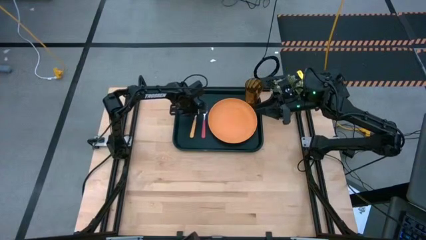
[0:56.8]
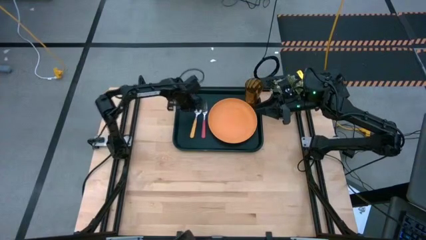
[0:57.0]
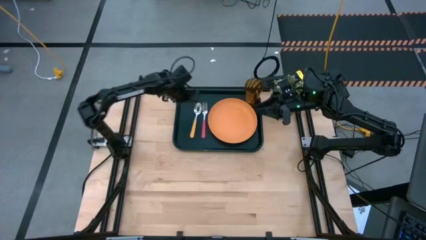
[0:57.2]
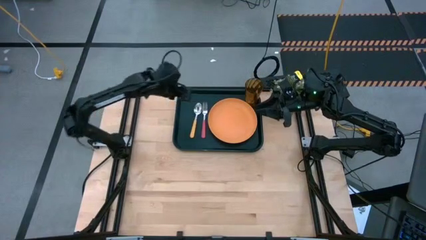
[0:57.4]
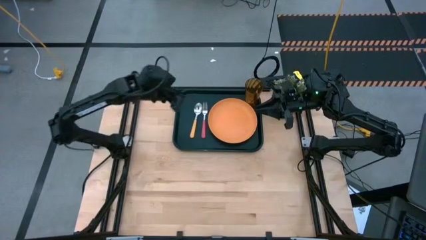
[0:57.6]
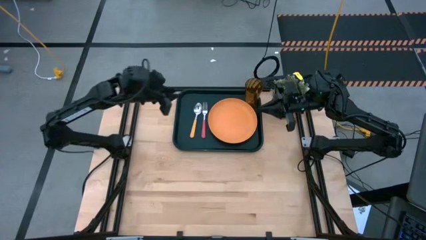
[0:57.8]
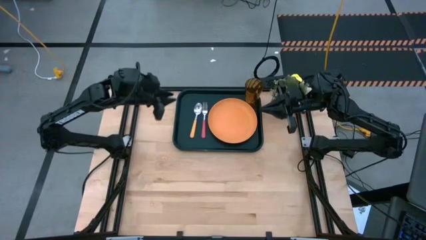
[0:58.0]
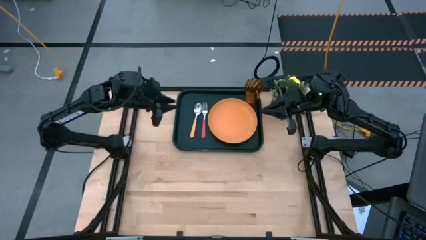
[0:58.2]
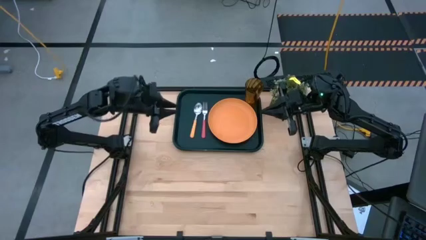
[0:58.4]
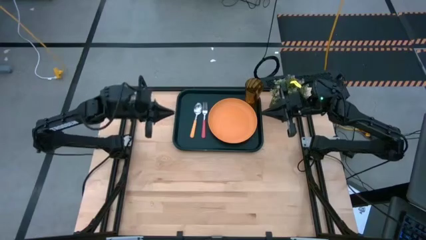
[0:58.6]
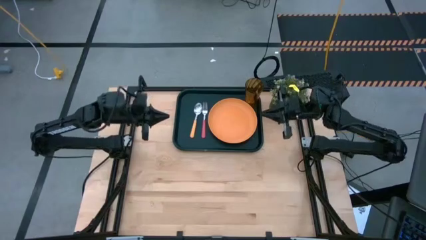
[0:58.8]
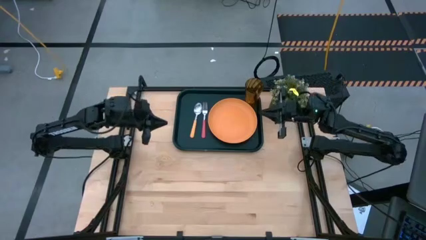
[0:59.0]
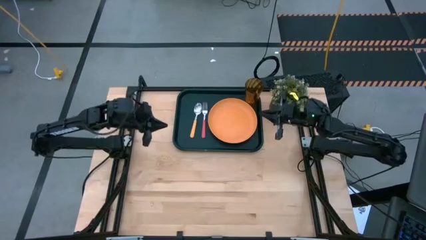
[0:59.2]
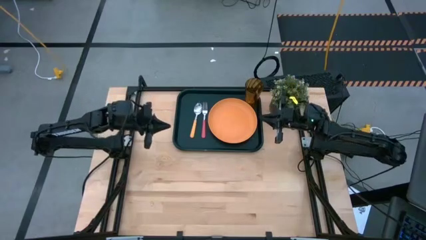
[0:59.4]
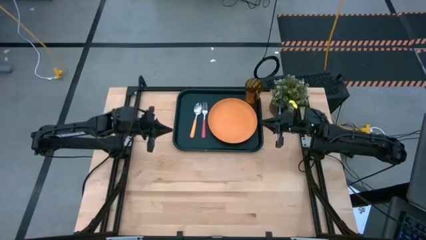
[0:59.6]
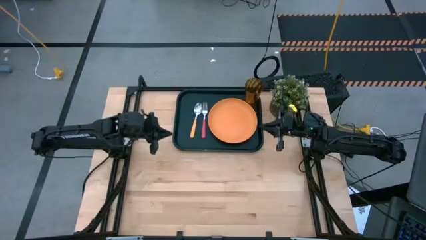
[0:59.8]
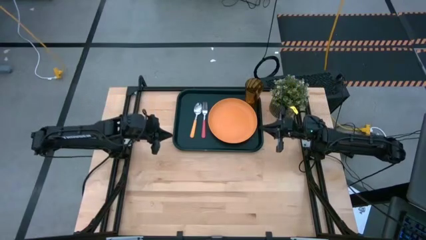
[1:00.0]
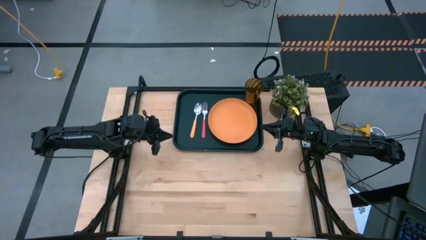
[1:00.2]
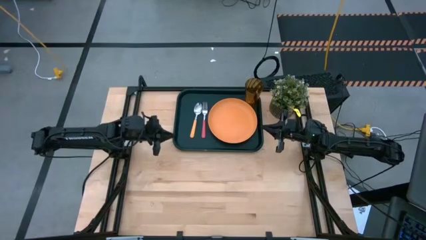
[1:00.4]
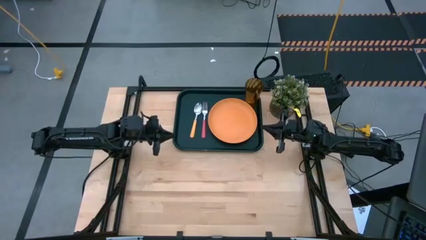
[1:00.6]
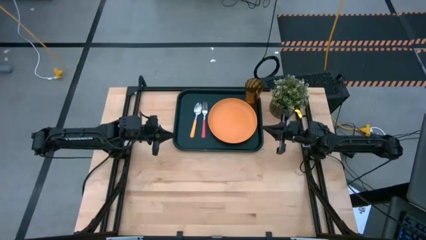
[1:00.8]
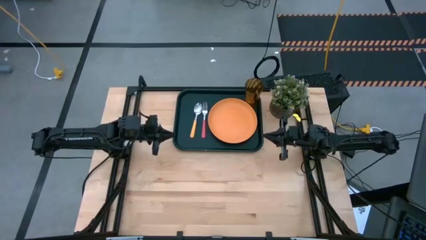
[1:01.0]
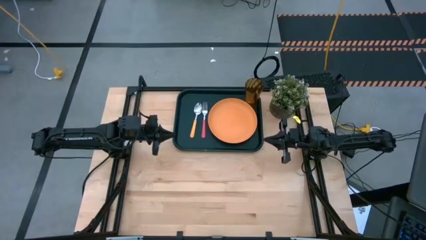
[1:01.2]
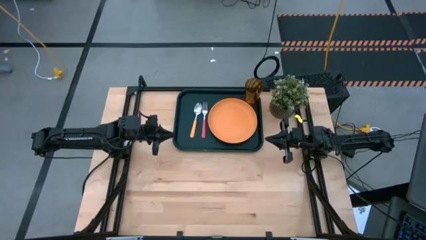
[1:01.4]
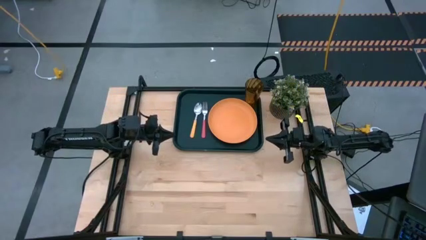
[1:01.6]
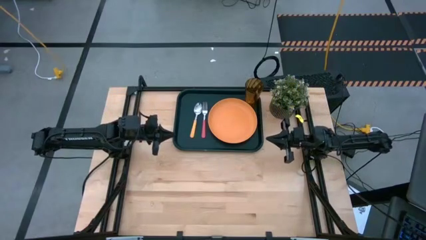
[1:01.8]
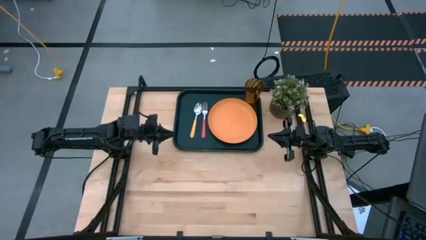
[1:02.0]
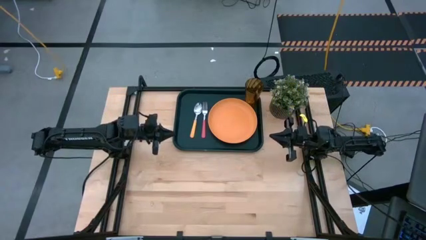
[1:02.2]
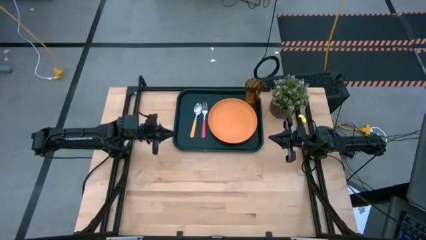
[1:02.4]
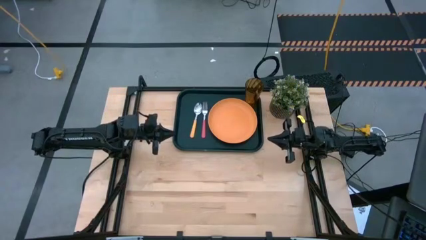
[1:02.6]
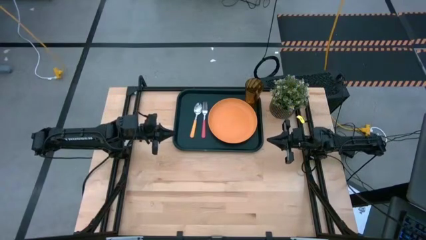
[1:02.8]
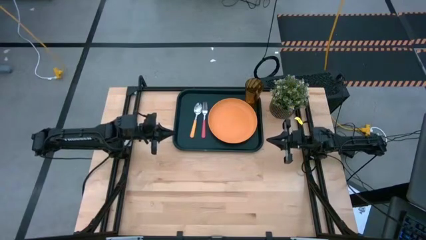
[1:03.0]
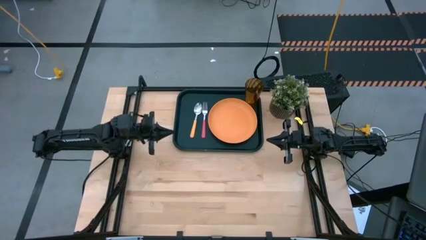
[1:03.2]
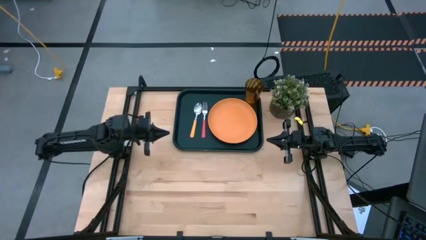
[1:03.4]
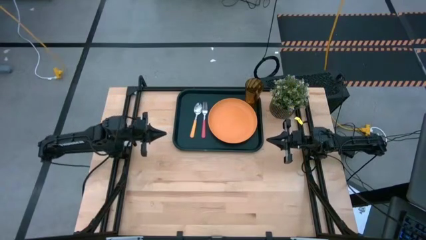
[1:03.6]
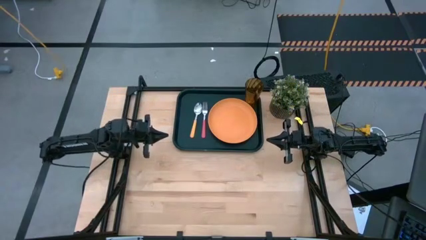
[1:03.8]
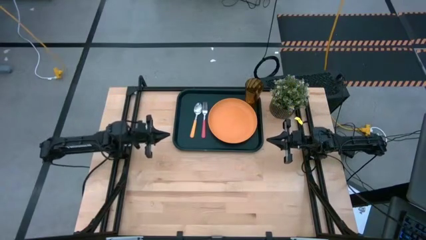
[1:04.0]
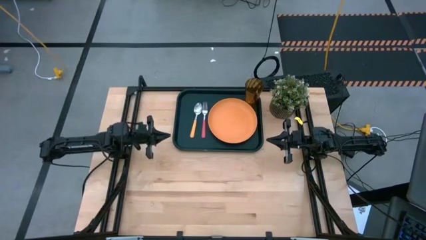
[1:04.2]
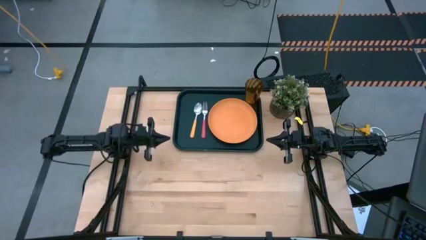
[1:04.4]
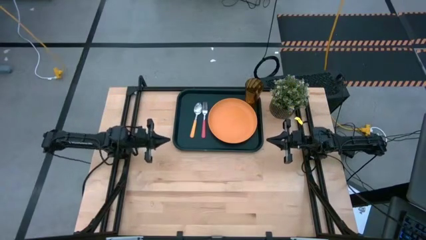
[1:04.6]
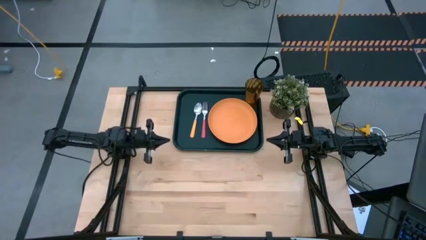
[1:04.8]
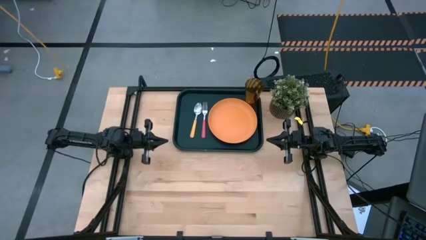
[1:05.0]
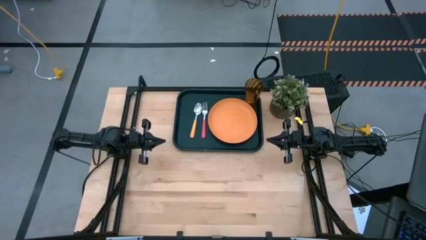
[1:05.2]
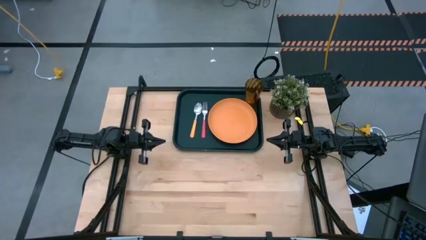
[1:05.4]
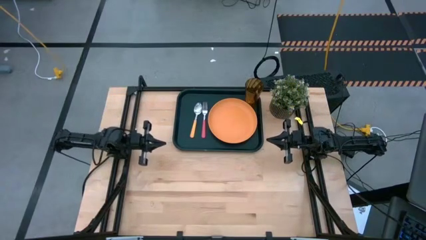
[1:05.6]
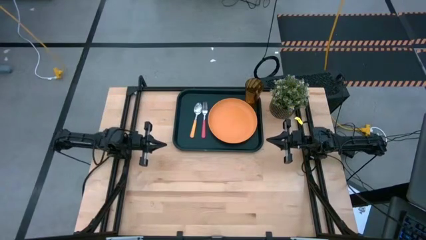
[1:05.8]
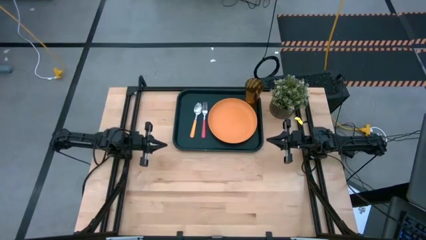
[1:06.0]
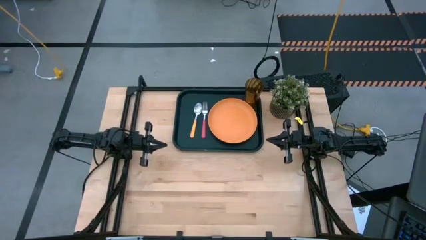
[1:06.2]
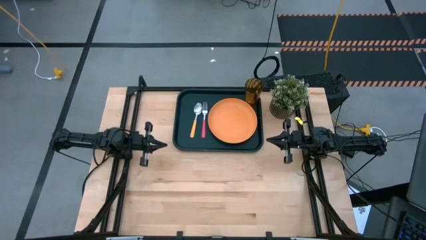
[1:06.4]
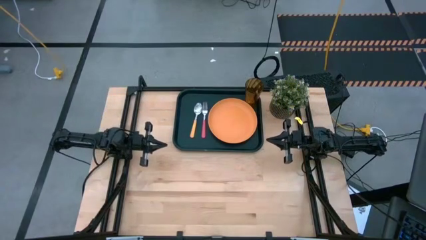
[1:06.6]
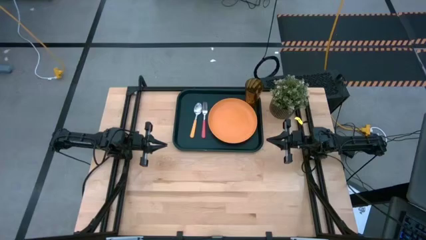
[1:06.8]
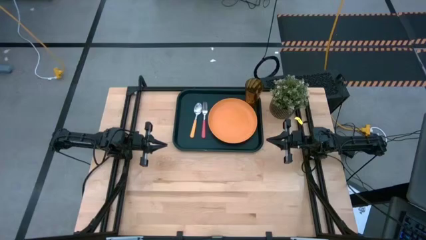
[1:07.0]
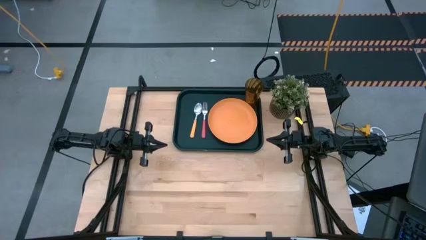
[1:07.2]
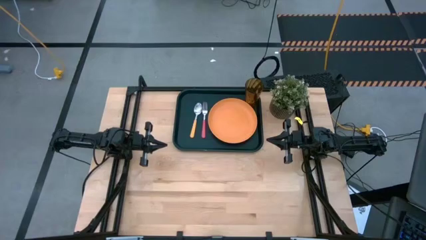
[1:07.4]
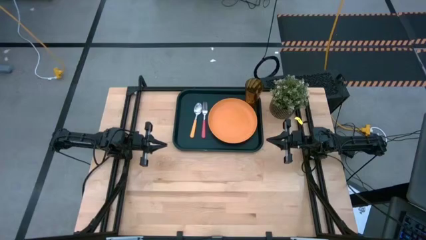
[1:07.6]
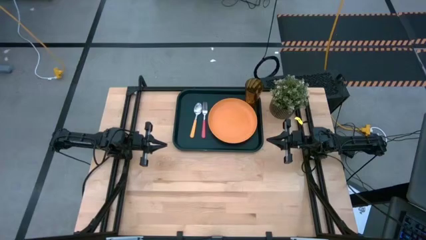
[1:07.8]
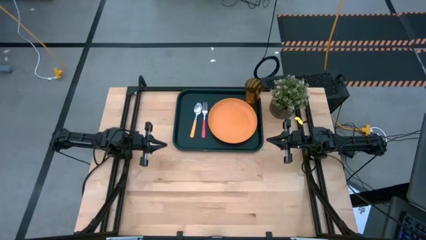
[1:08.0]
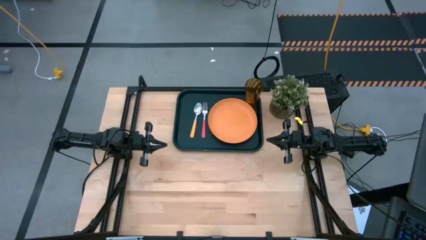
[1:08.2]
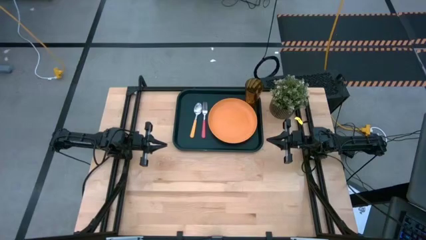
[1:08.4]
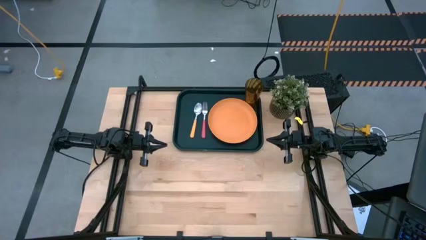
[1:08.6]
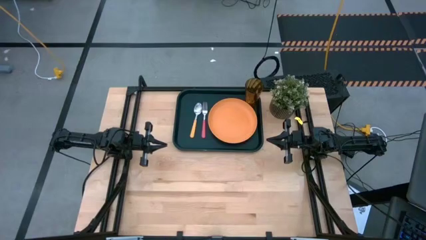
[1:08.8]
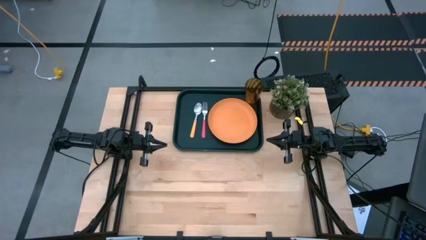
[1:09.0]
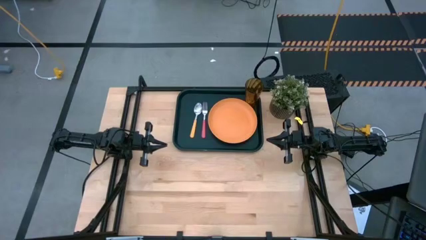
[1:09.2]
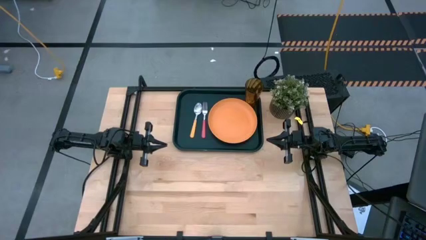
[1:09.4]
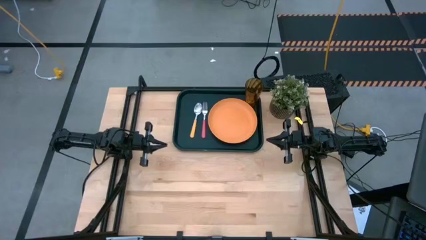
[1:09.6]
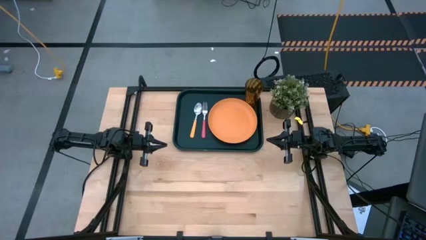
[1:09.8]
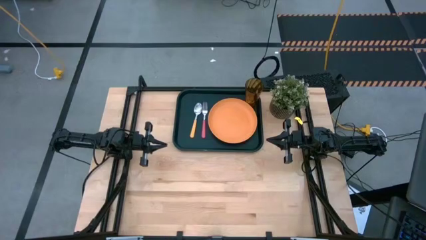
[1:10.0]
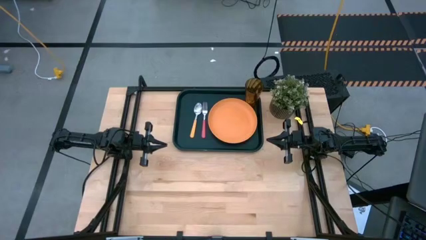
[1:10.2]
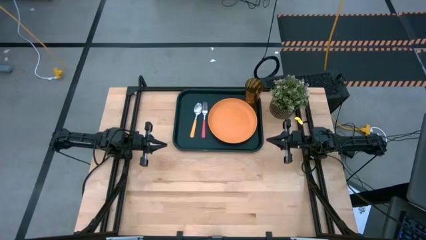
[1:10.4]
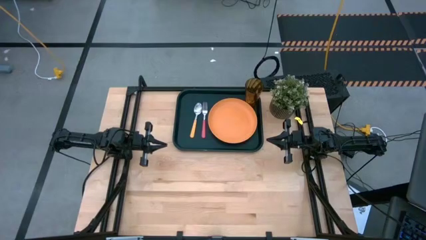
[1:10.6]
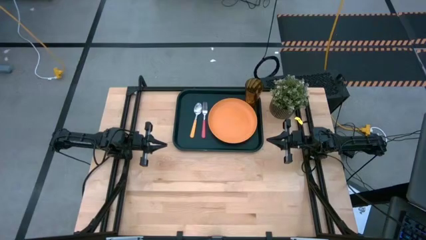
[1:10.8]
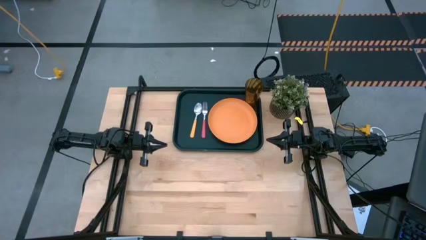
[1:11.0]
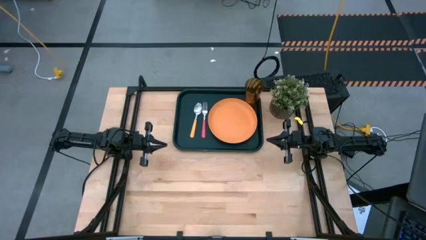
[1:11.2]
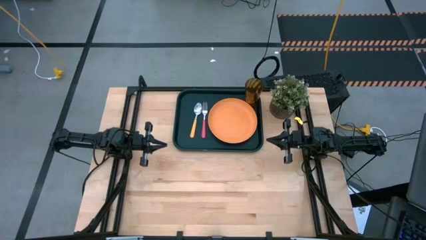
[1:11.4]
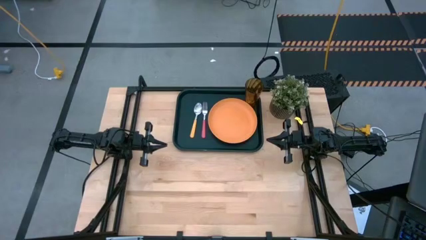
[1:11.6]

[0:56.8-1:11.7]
Task: Pick and place plate/cup/fork/spoon on tray
Return to Home Position

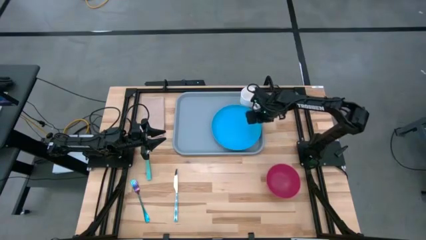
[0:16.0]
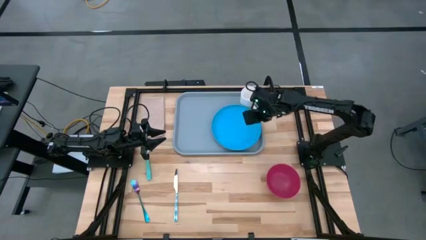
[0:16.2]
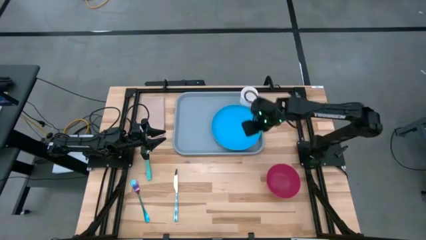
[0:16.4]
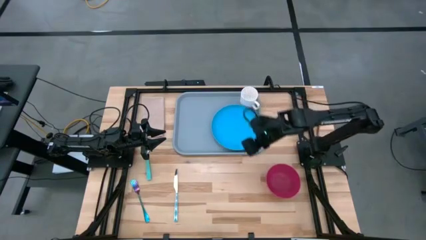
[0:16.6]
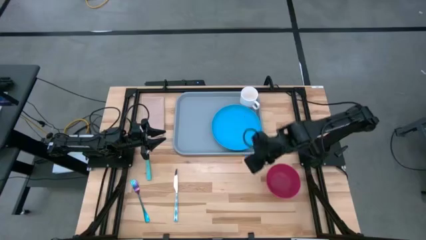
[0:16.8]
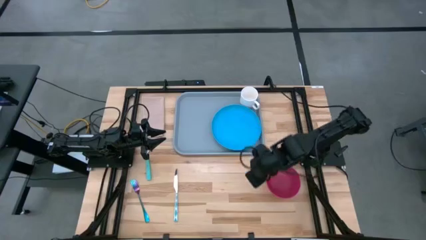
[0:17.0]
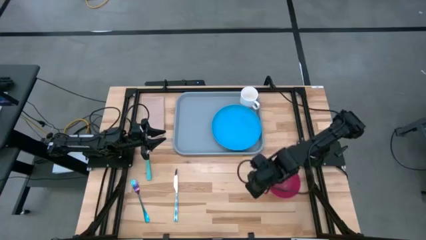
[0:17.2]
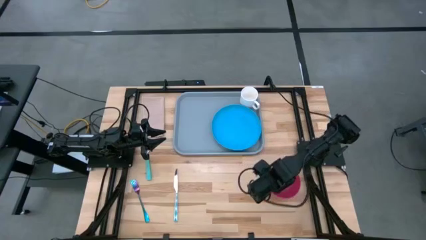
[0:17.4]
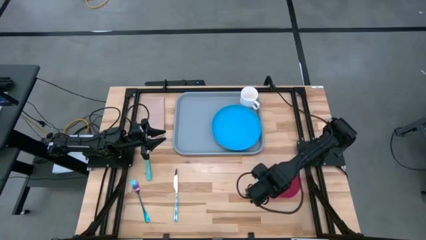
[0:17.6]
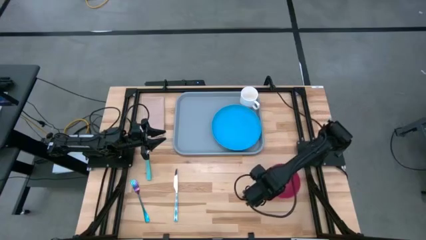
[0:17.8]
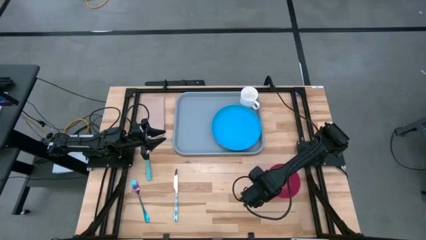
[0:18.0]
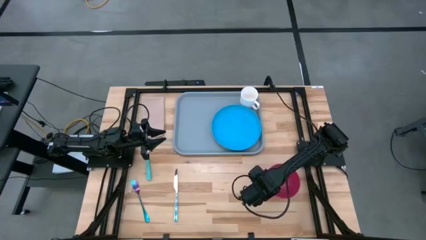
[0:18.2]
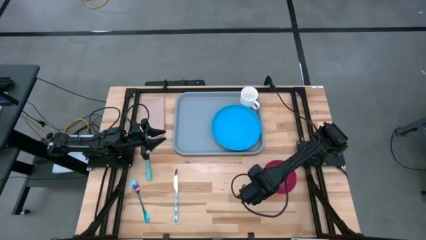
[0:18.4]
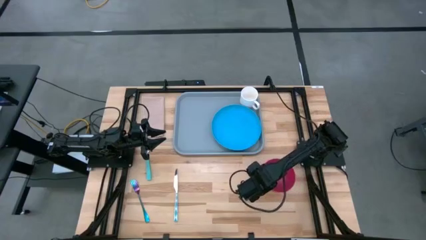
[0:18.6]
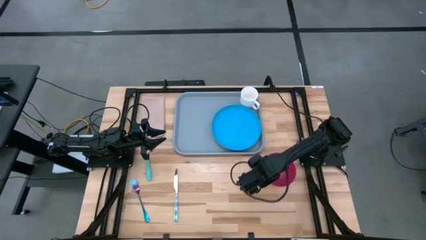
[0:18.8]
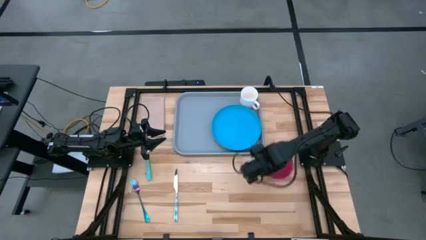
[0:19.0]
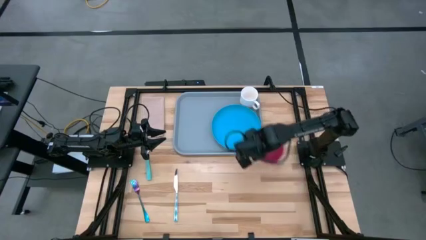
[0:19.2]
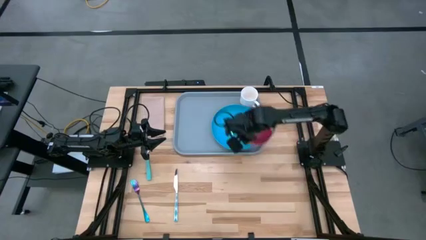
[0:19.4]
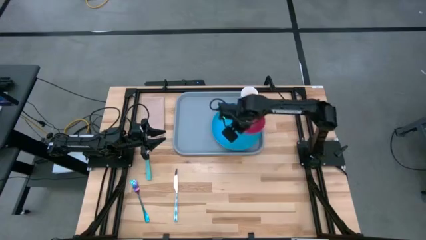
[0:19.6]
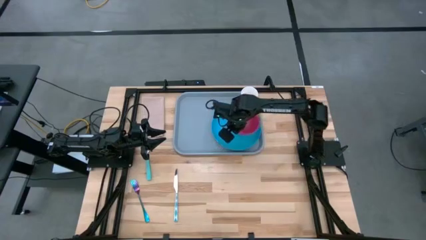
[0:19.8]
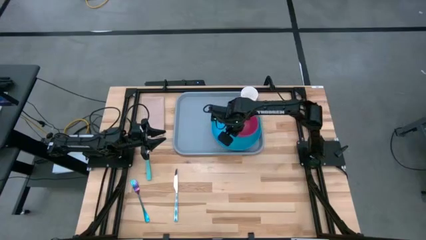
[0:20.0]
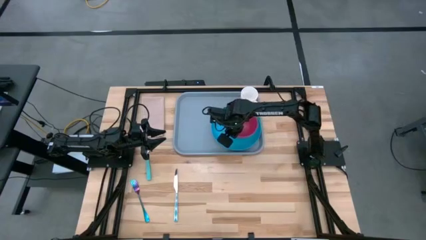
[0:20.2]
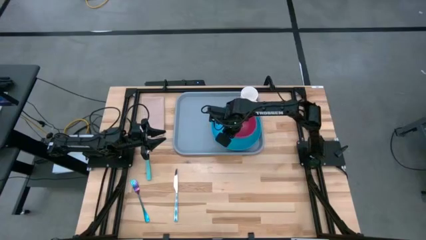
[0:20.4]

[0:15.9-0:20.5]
Task: Set up tray
Put the red bowl on top of the blue plate on the gray serving tray
